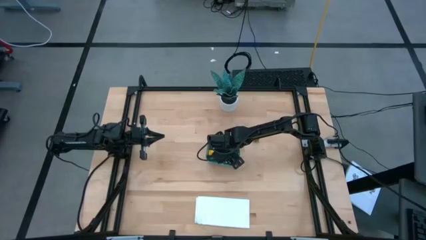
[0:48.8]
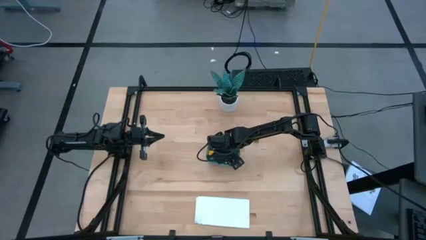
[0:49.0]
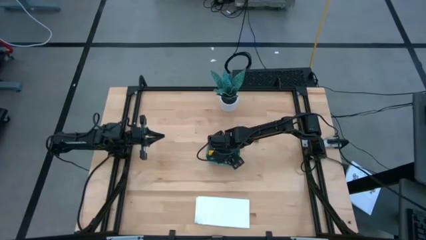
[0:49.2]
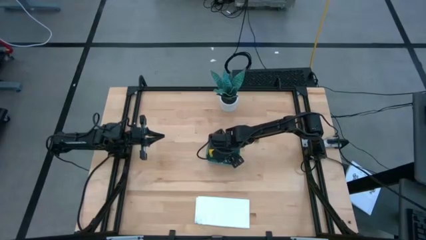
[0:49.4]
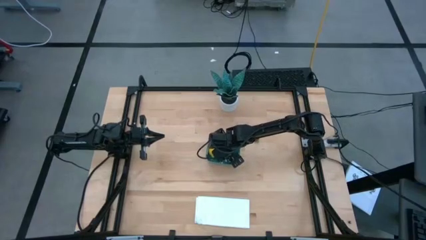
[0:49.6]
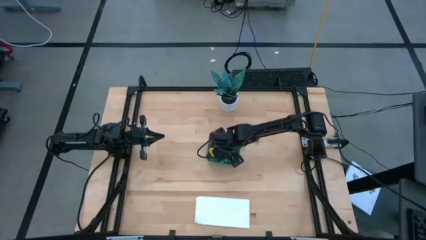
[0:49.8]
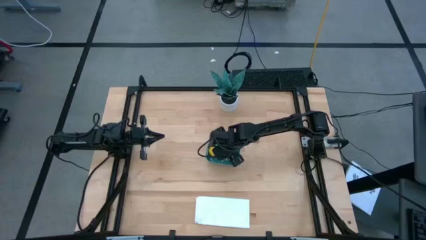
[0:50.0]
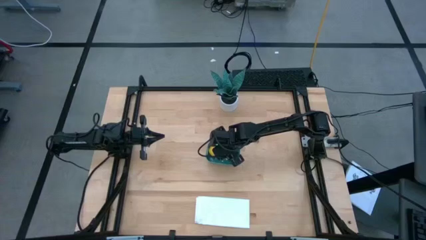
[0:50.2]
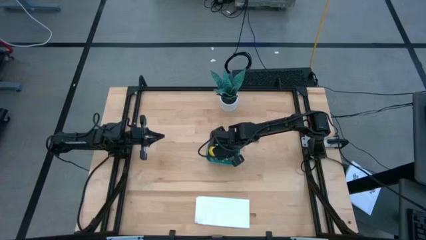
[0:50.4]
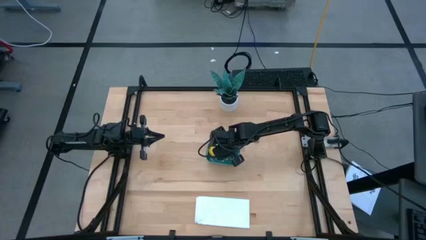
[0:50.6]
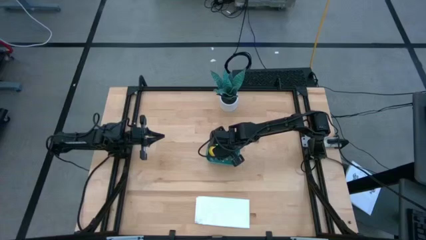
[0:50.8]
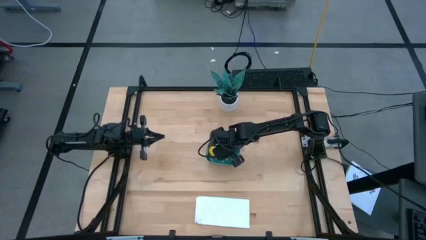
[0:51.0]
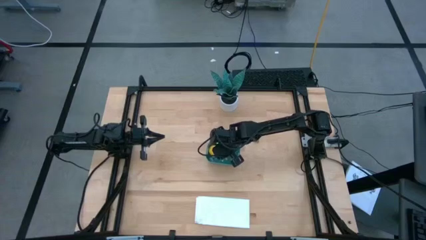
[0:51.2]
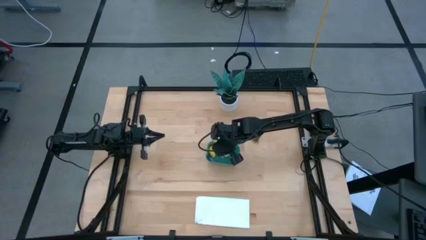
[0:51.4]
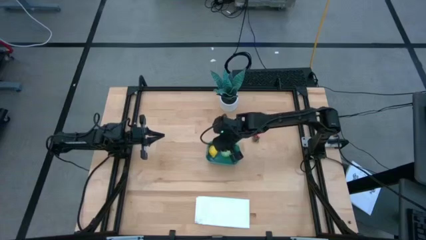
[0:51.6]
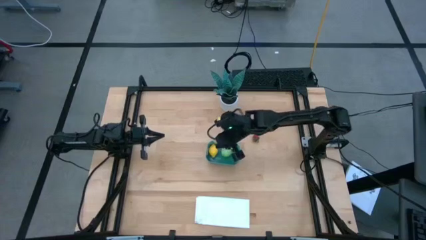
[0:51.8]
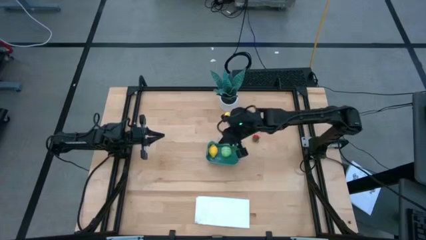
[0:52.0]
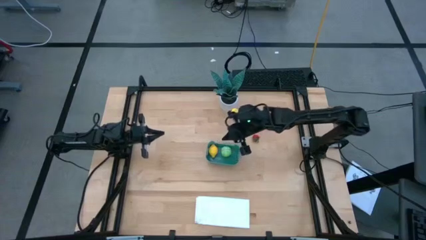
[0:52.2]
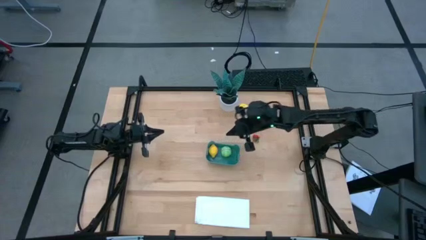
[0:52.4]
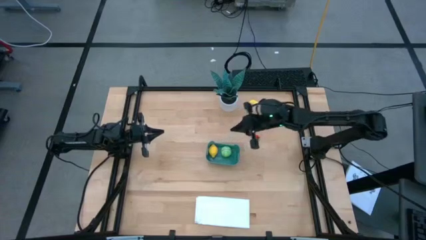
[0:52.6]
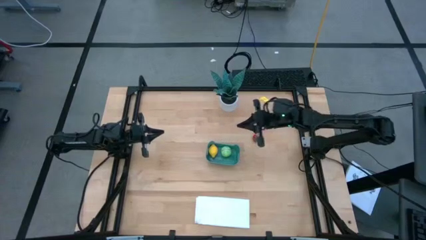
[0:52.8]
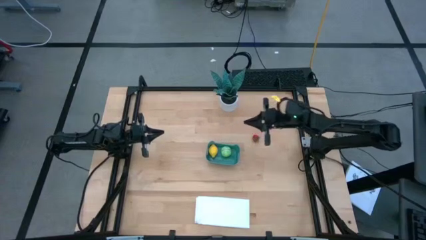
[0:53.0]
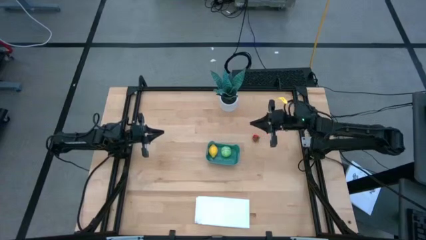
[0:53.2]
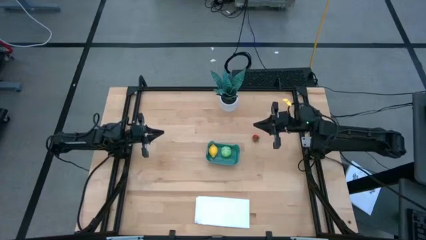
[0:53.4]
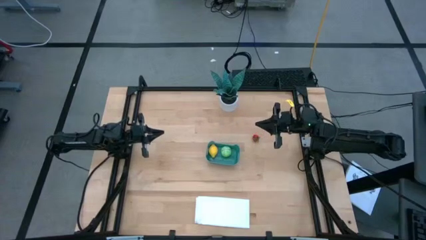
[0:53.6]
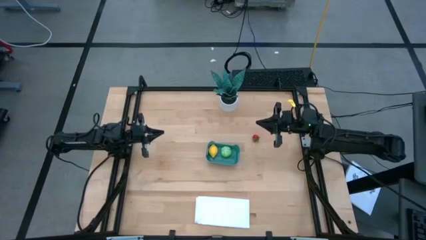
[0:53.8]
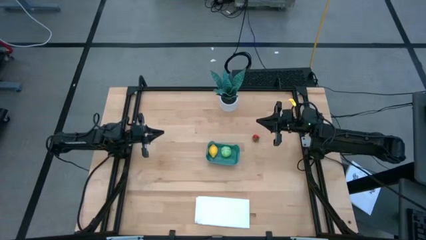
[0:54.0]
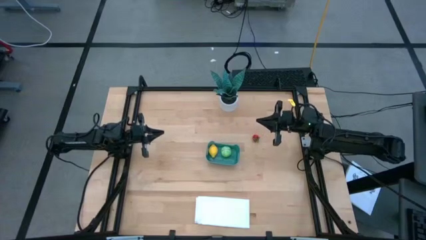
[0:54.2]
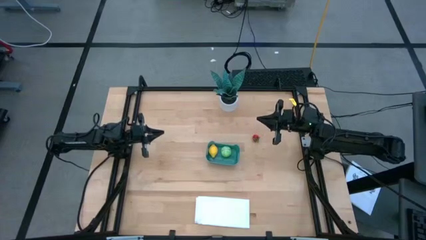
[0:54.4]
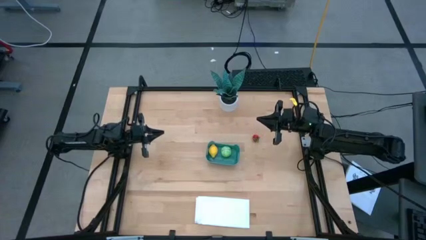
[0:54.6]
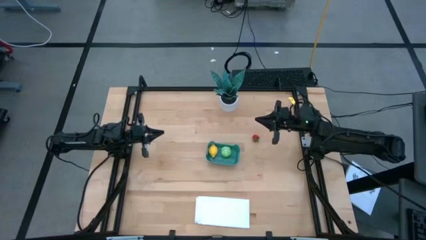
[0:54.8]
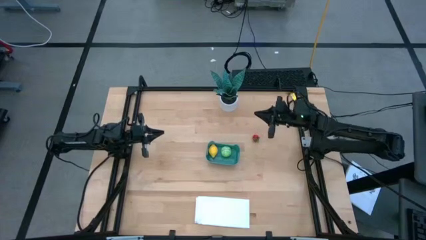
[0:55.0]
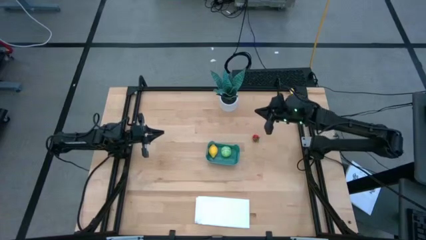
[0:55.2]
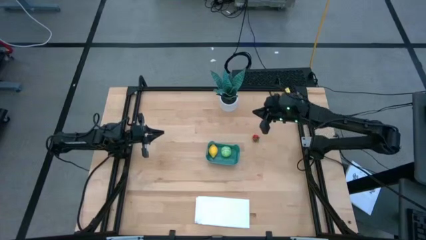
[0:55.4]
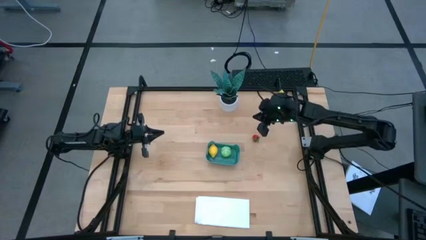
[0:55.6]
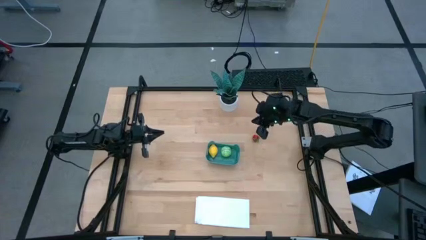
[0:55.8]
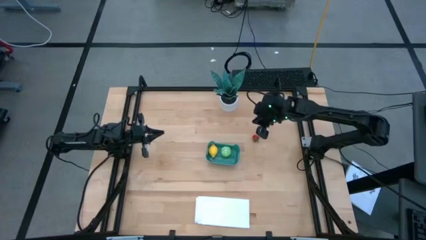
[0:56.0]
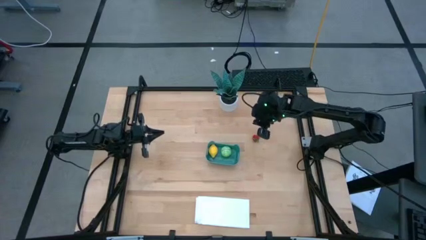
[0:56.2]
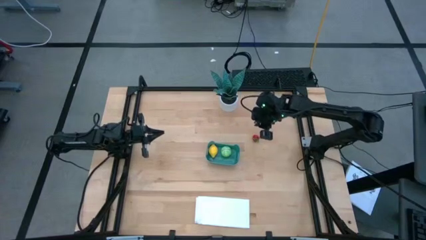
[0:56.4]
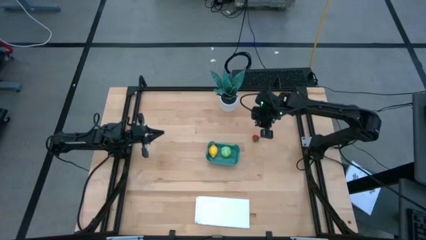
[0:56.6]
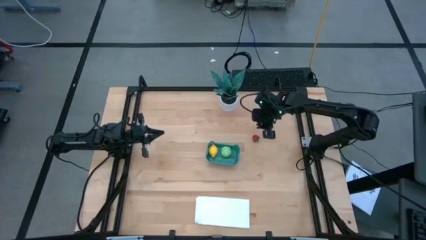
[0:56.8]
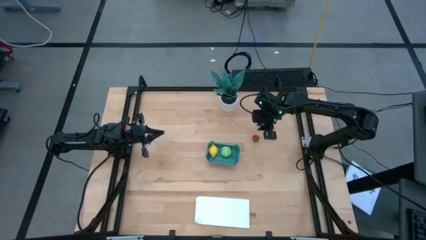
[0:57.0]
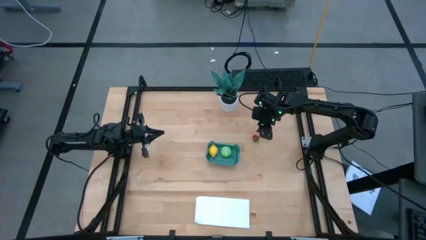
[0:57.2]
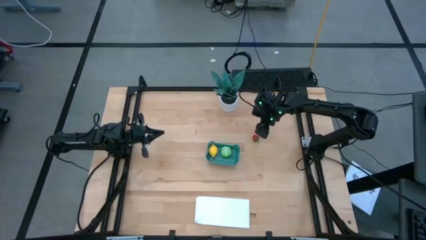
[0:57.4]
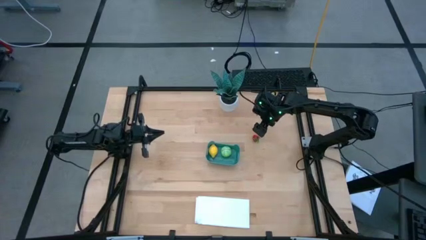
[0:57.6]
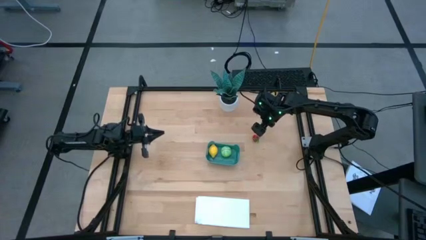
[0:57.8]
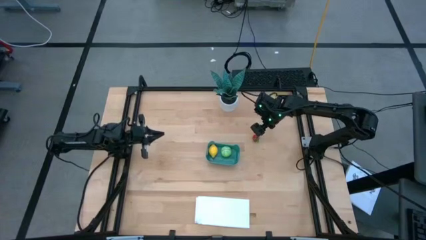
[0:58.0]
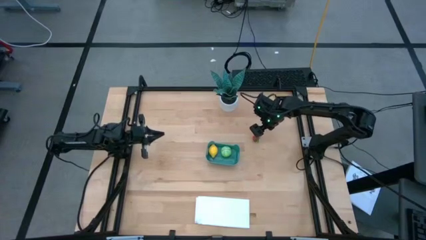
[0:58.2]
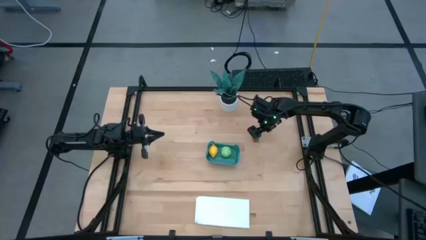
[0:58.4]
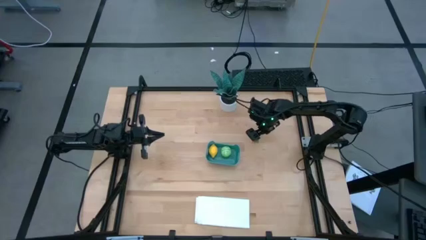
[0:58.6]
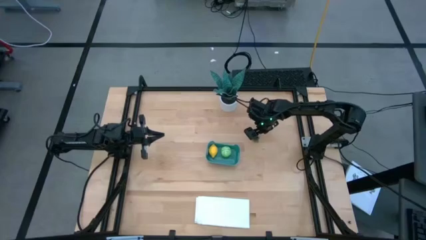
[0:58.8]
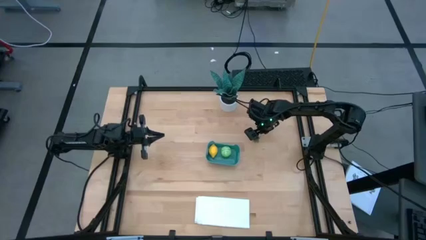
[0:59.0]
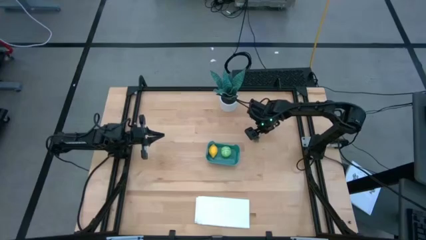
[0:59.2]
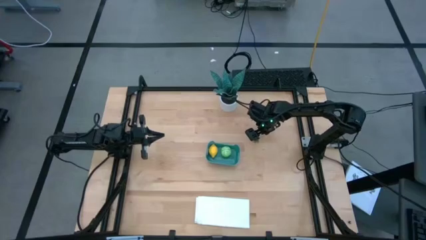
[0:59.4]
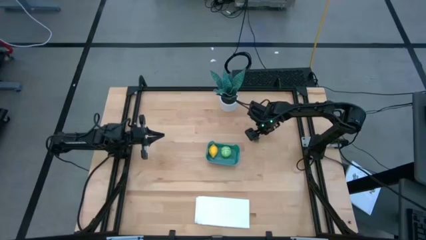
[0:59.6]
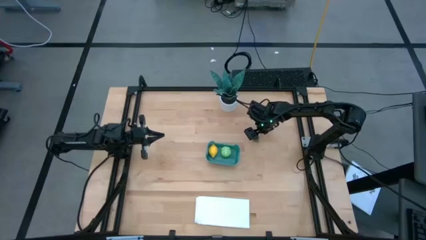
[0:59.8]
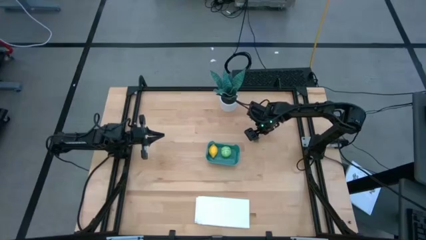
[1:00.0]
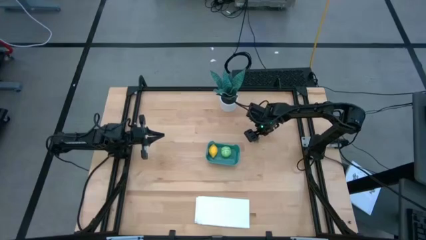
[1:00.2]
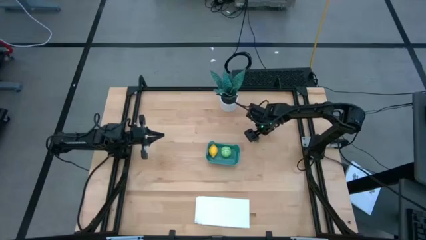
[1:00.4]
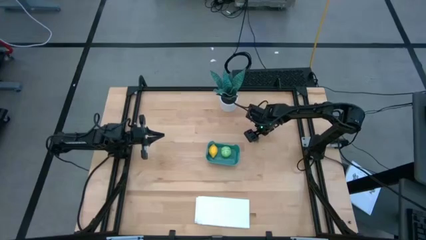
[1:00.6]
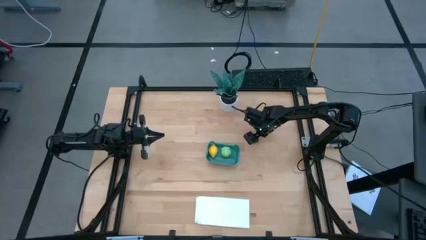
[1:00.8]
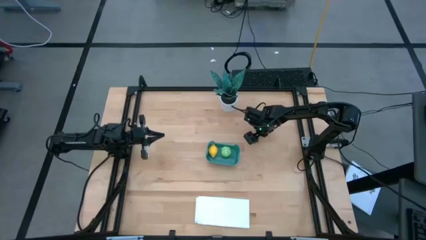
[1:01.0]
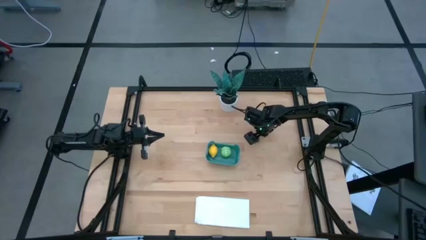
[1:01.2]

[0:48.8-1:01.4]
Task: Pick and placing Produce into tupperware
Put the red strawberry into the blue basket

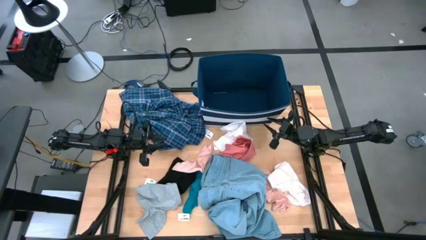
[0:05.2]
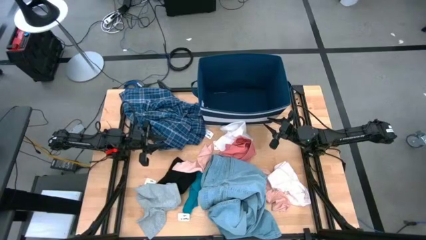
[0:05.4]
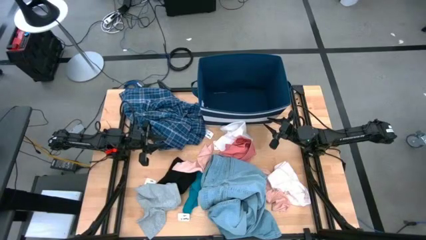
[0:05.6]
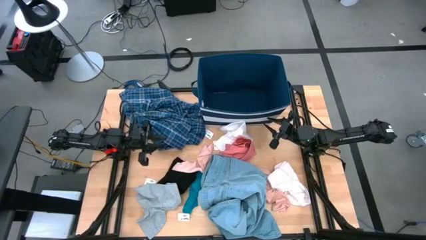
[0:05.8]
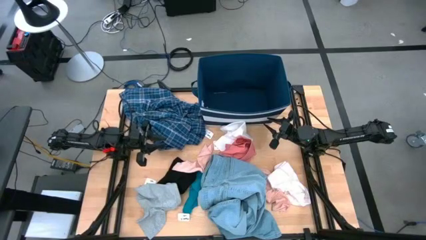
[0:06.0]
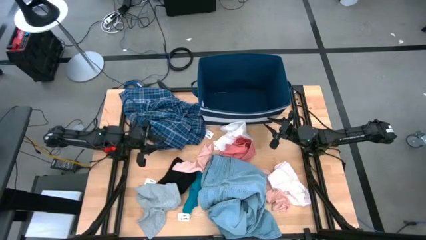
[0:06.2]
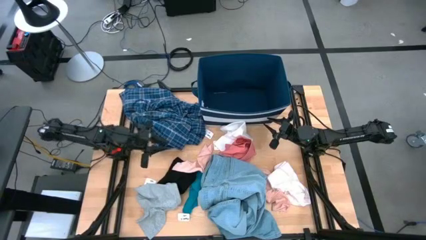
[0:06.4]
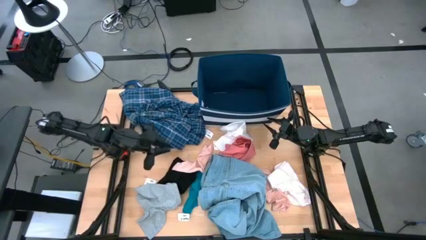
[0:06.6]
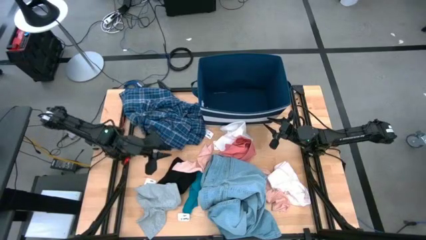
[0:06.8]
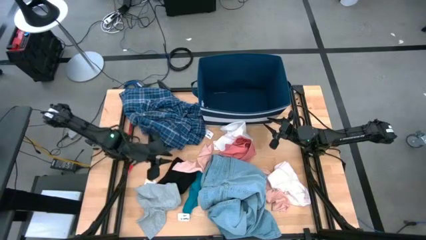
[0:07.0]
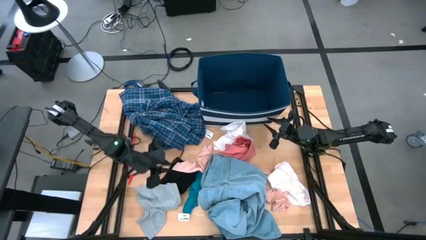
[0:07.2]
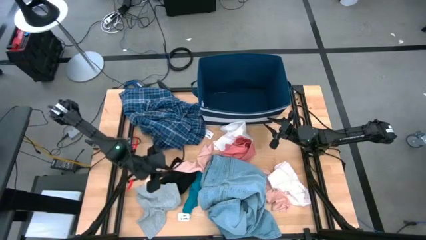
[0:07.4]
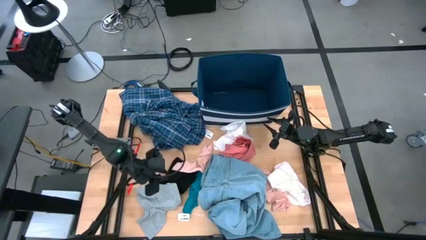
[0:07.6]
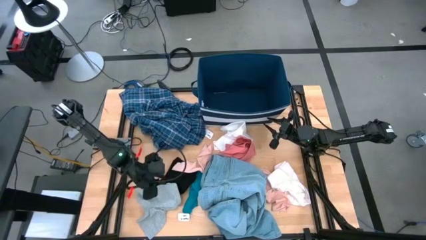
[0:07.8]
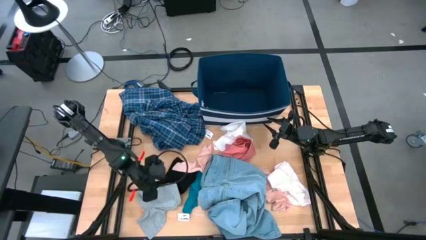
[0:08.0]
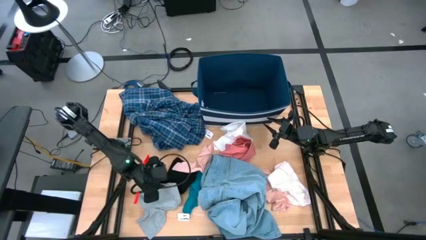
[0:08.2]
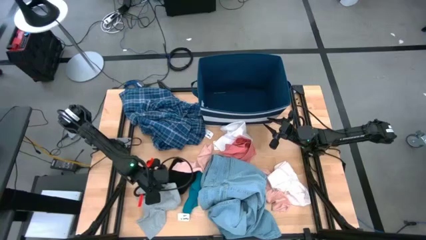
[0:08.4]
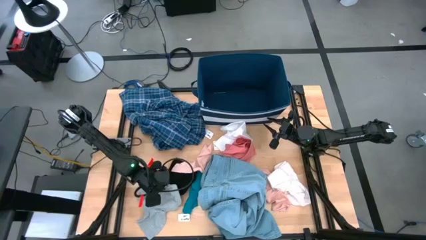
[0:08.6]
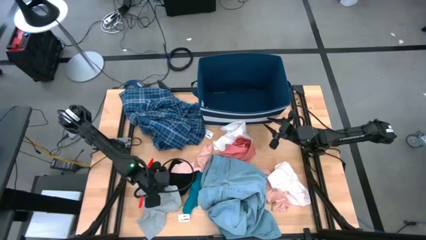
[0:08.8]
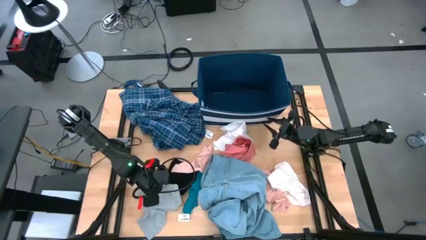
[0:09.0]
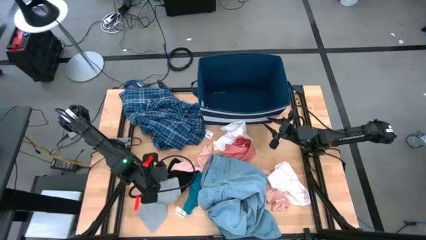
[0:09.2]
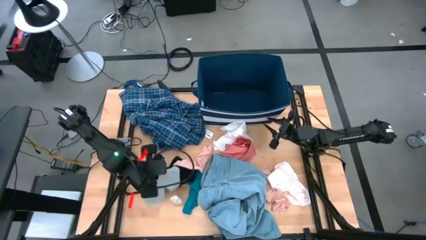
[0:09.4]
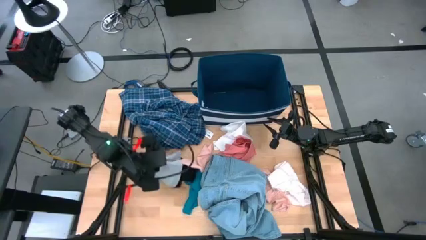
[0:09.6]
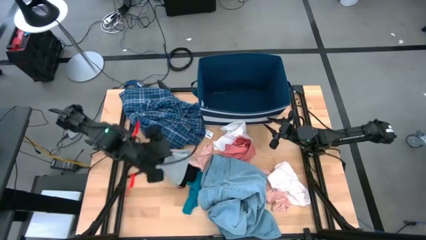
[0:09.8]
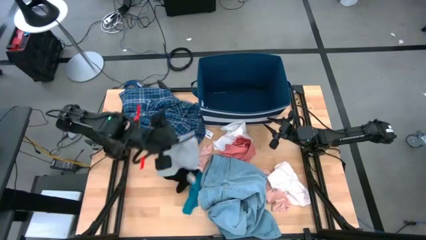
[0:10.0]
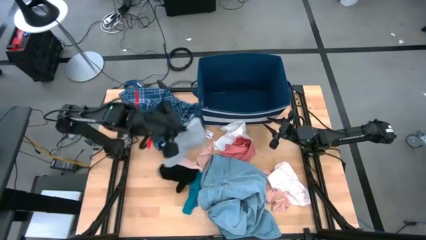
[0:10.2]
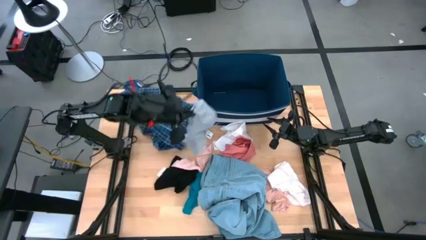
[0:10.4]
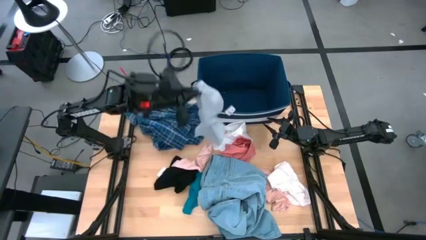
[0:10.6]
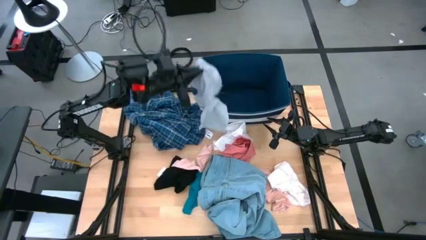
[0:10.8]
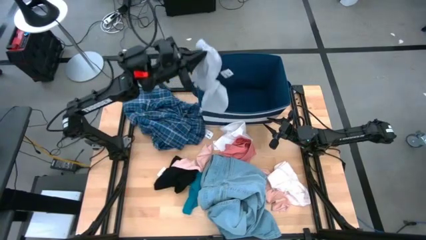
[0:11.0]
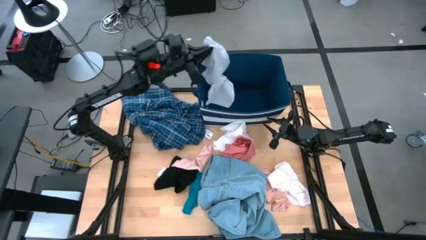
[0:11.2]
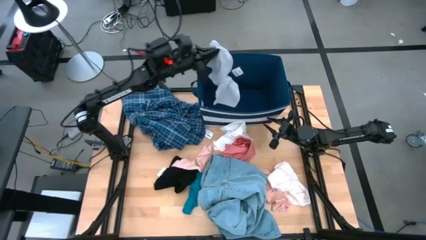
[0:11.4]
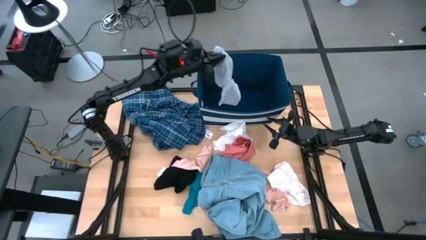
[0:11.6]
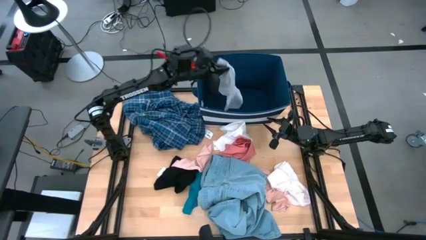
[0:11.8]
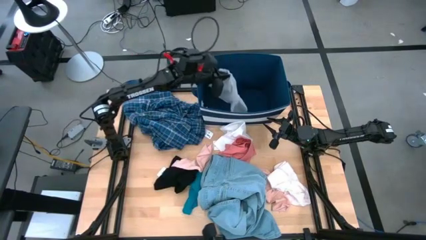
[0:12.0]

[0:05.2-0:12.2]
Task: Sort clothes
Put the gray boxer shorts into the blue laundry bin
